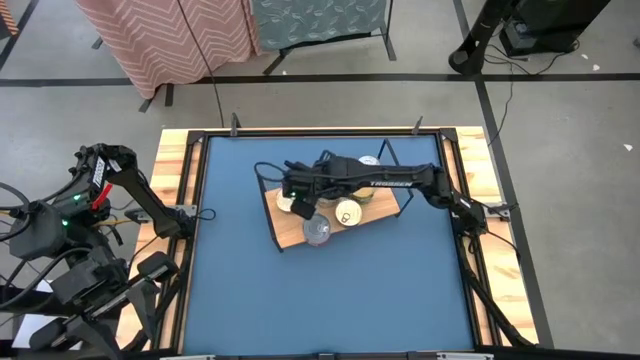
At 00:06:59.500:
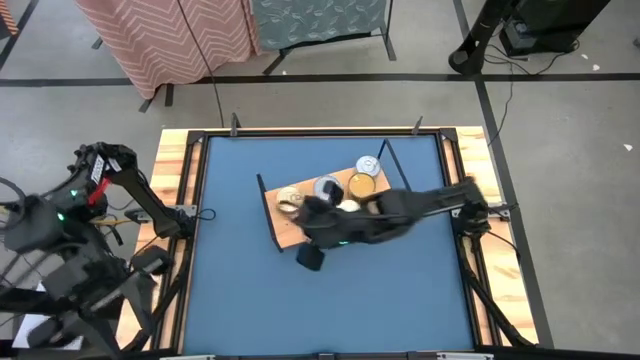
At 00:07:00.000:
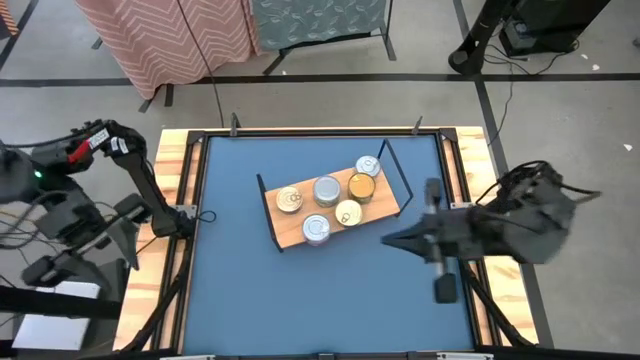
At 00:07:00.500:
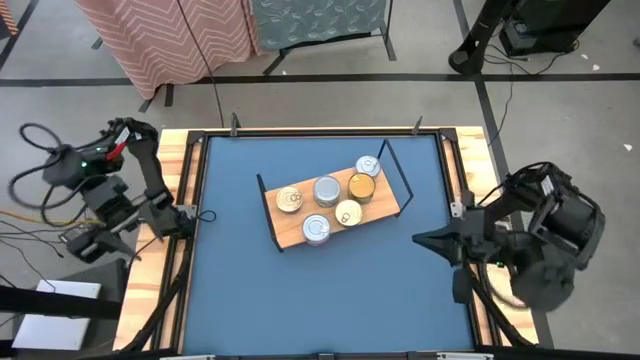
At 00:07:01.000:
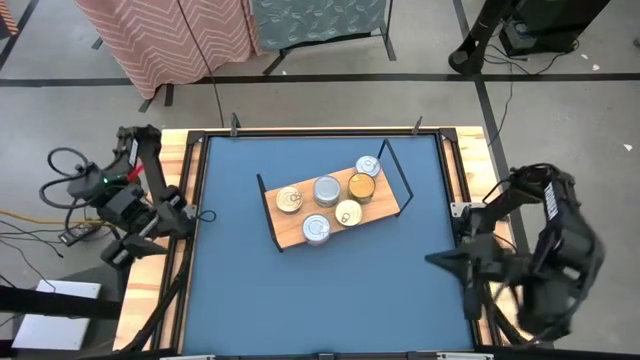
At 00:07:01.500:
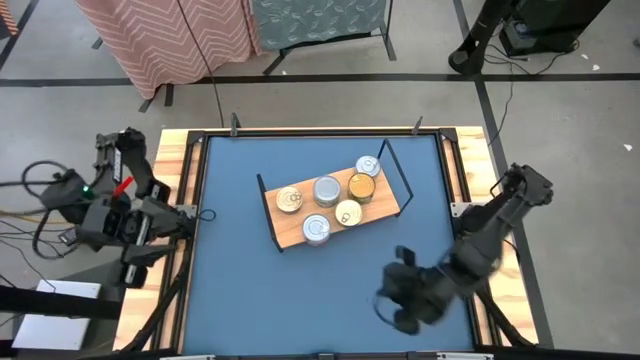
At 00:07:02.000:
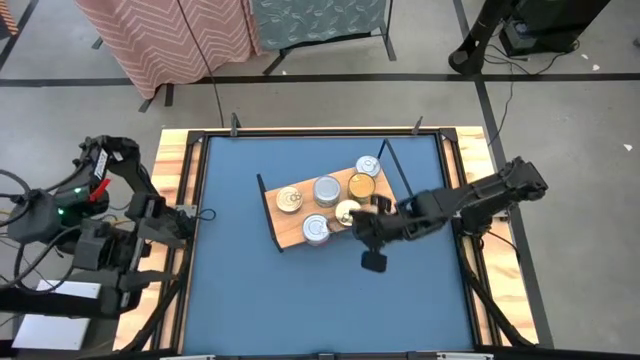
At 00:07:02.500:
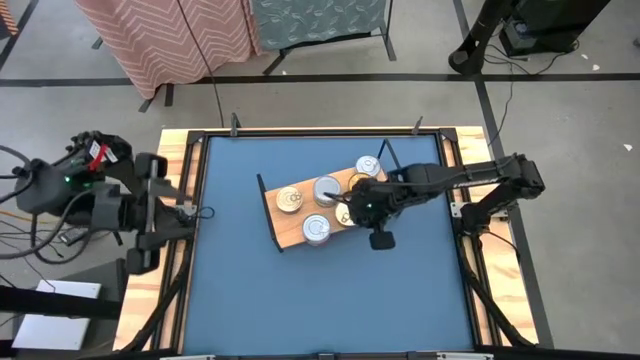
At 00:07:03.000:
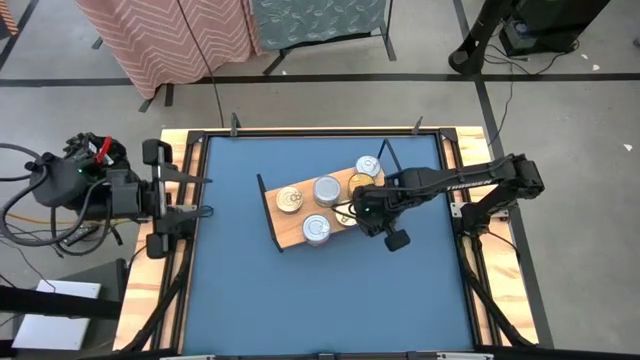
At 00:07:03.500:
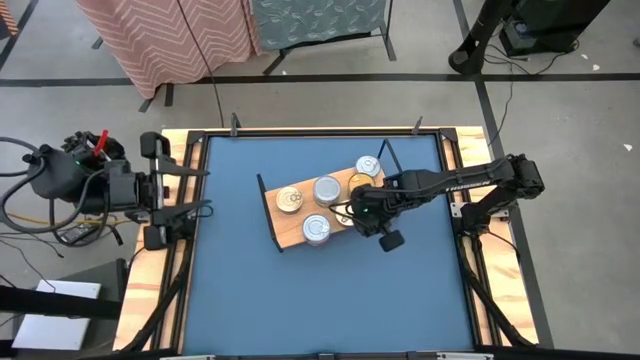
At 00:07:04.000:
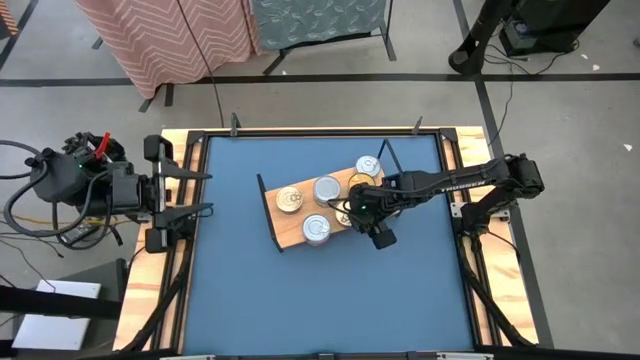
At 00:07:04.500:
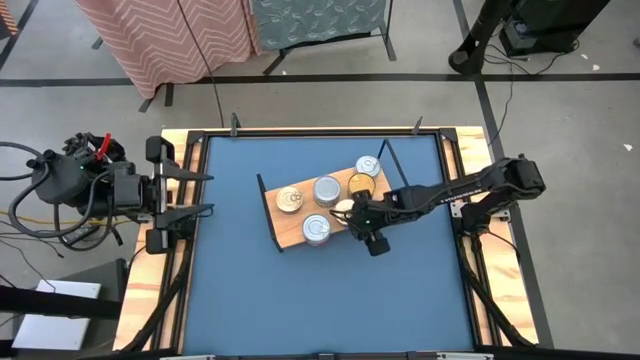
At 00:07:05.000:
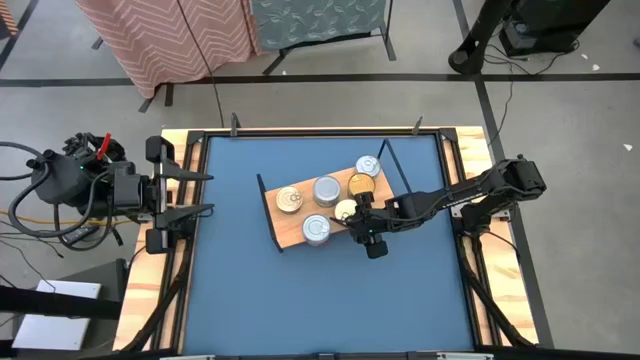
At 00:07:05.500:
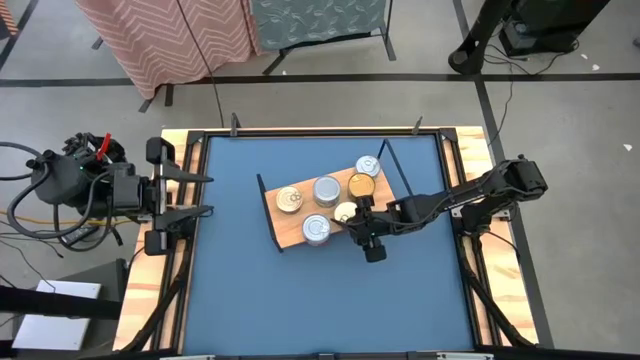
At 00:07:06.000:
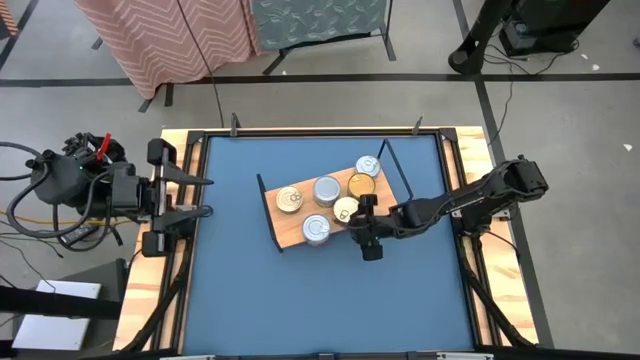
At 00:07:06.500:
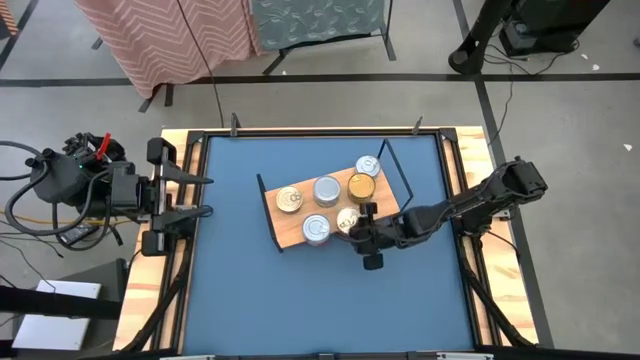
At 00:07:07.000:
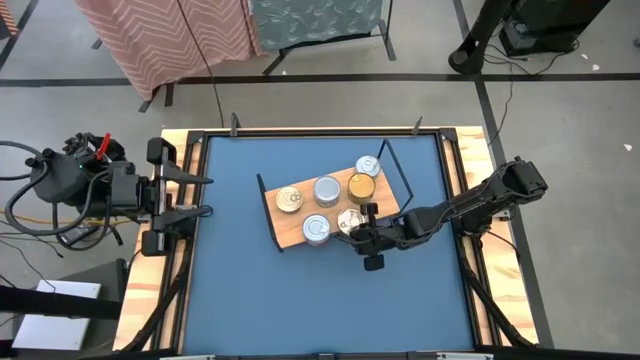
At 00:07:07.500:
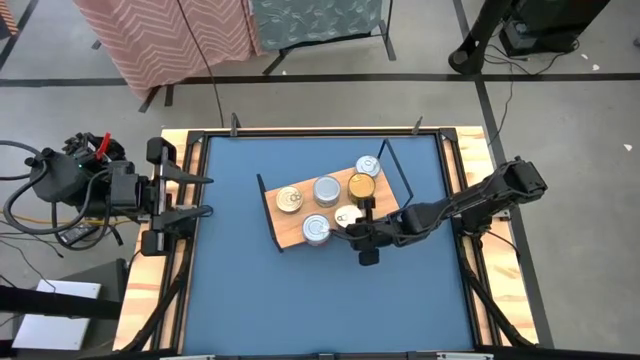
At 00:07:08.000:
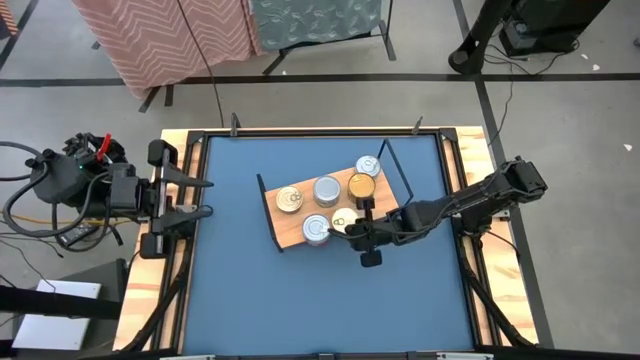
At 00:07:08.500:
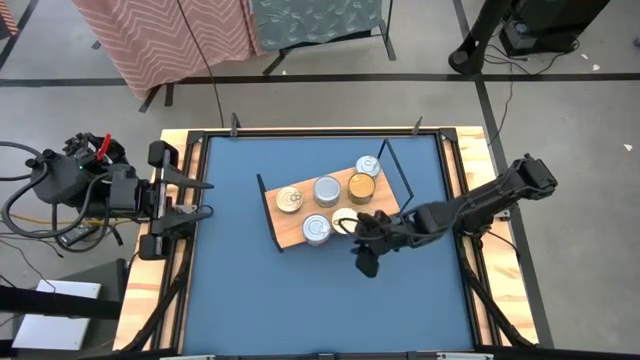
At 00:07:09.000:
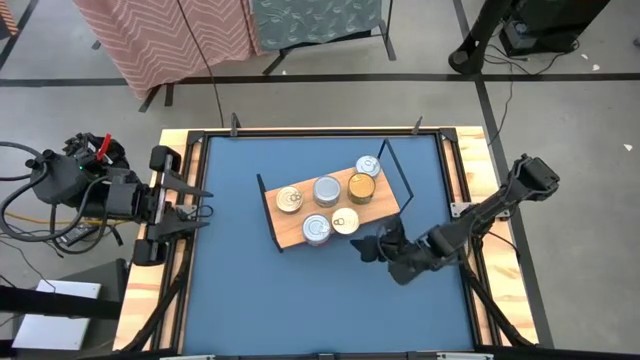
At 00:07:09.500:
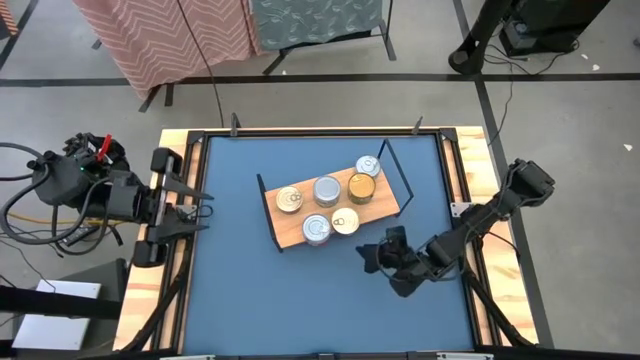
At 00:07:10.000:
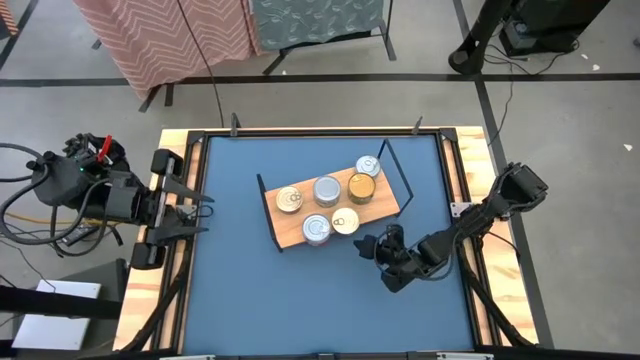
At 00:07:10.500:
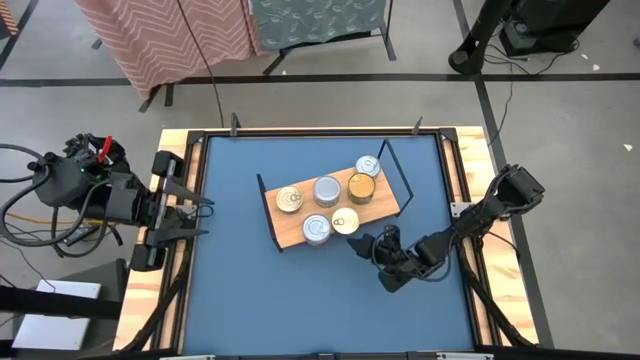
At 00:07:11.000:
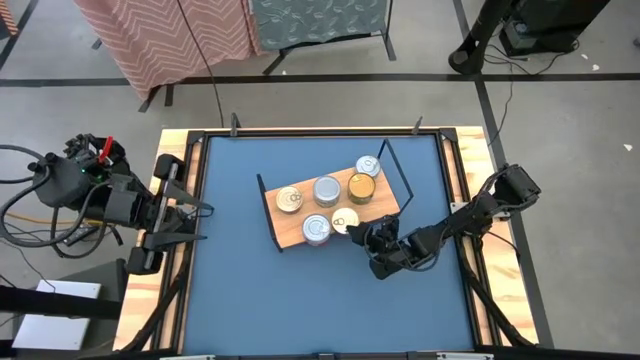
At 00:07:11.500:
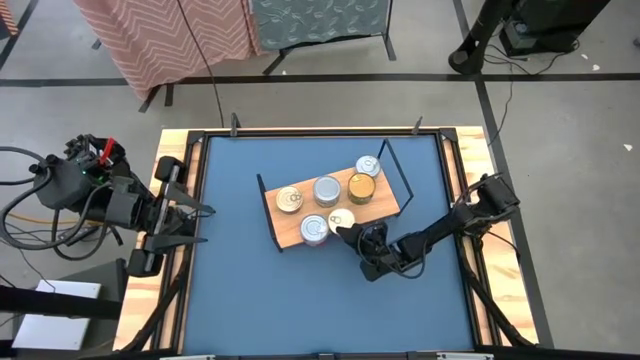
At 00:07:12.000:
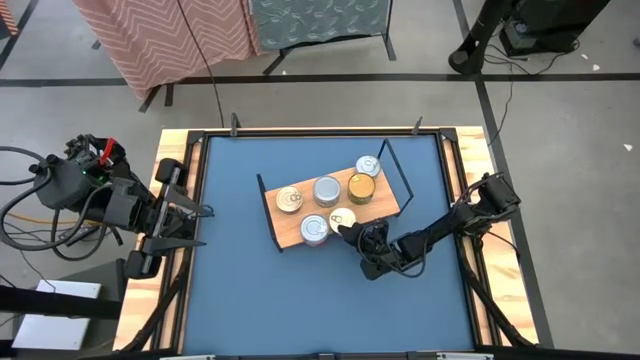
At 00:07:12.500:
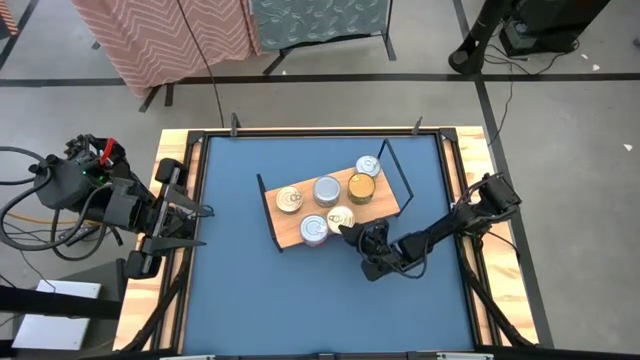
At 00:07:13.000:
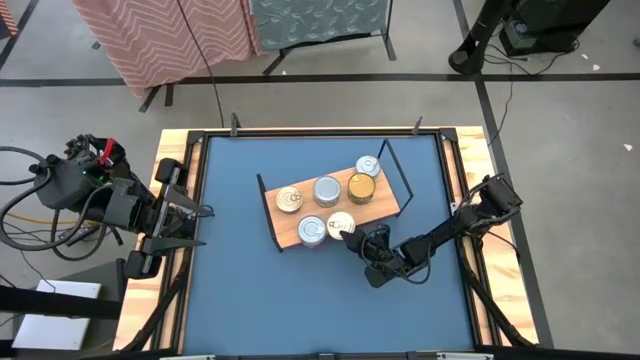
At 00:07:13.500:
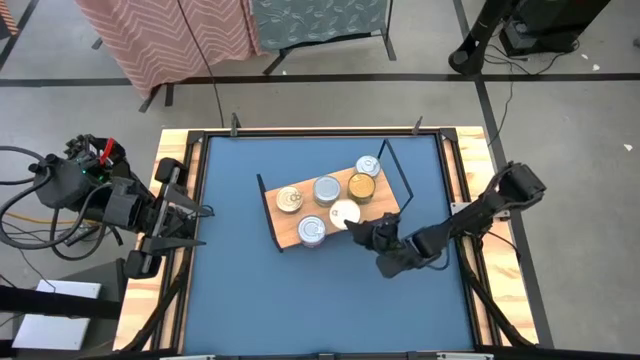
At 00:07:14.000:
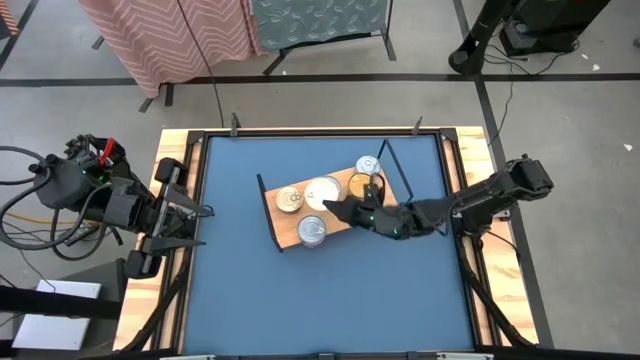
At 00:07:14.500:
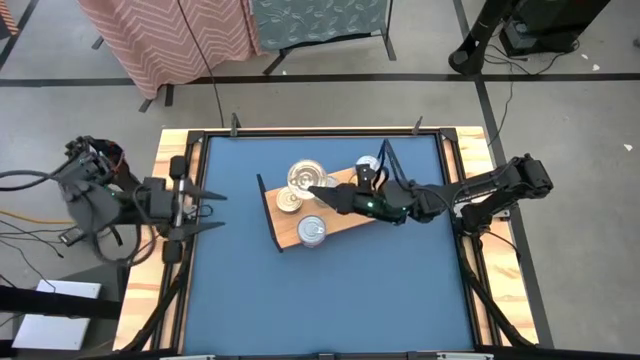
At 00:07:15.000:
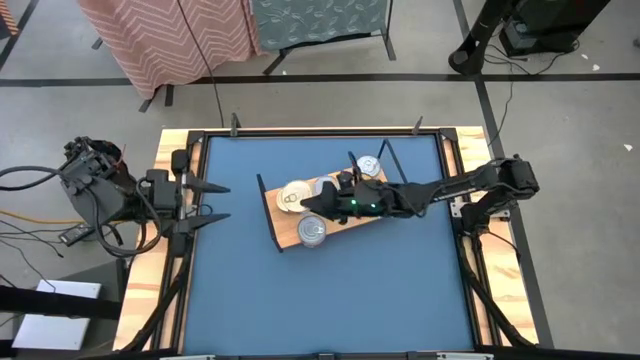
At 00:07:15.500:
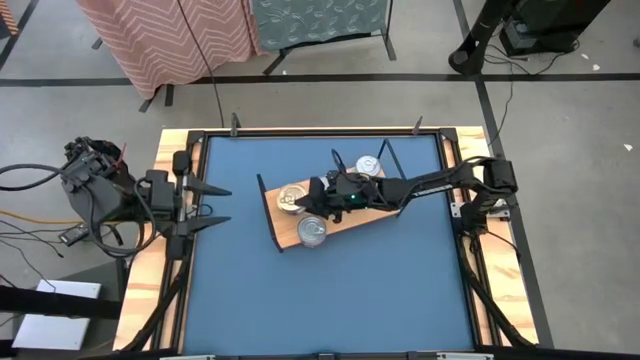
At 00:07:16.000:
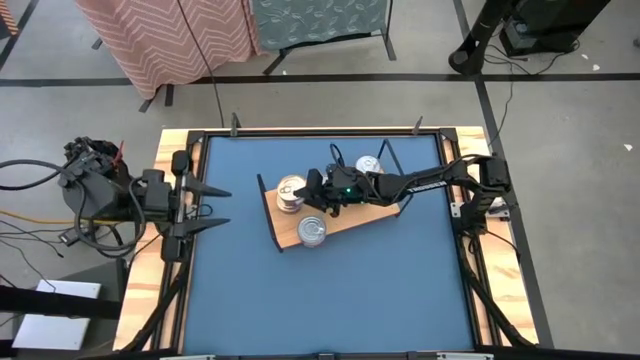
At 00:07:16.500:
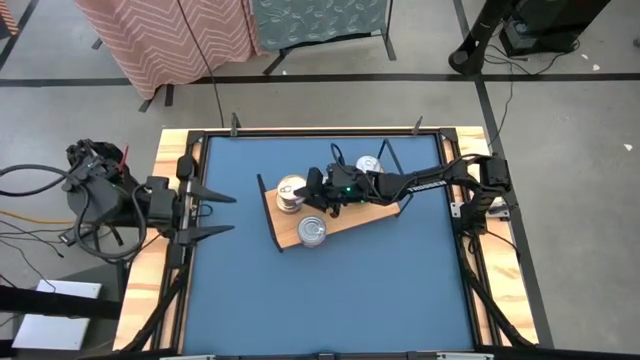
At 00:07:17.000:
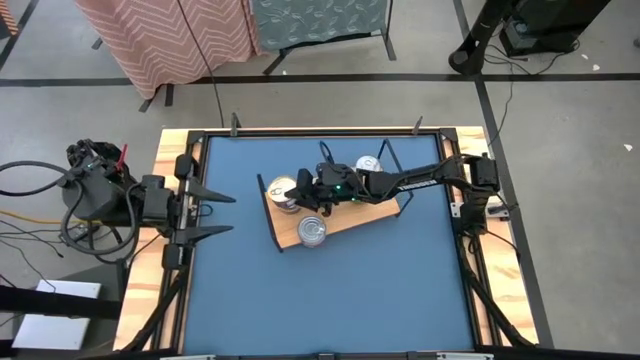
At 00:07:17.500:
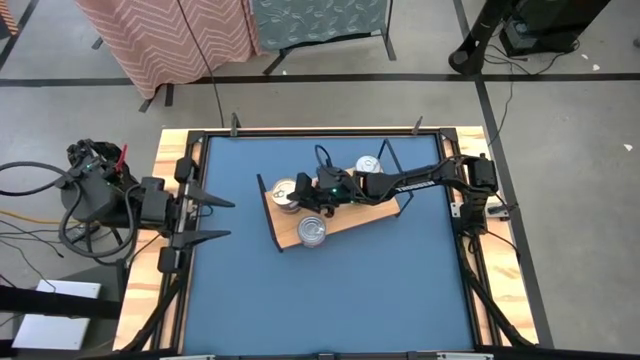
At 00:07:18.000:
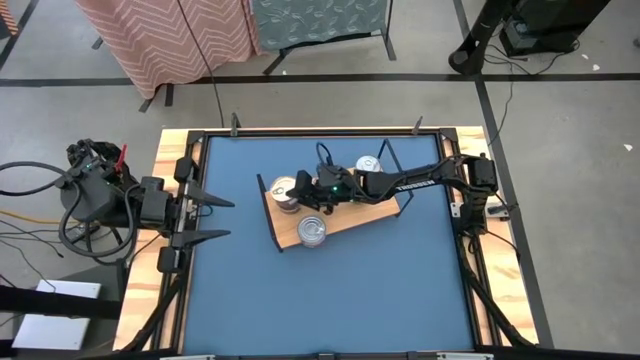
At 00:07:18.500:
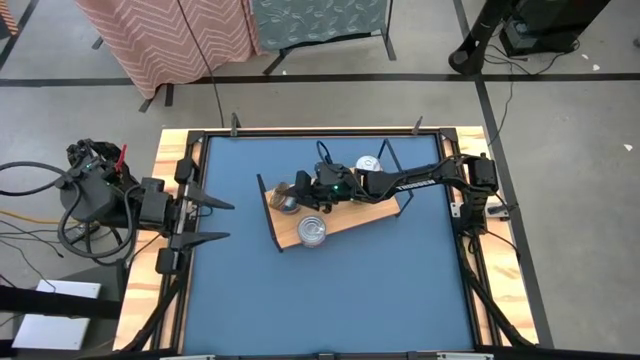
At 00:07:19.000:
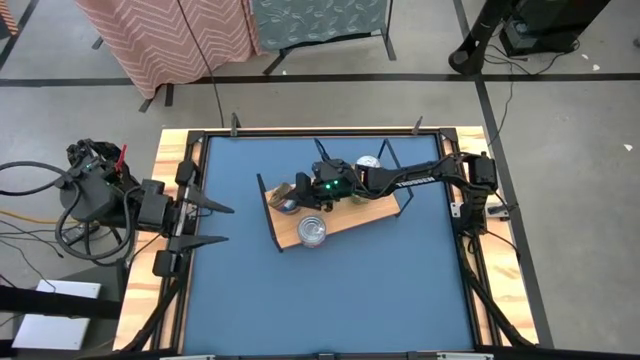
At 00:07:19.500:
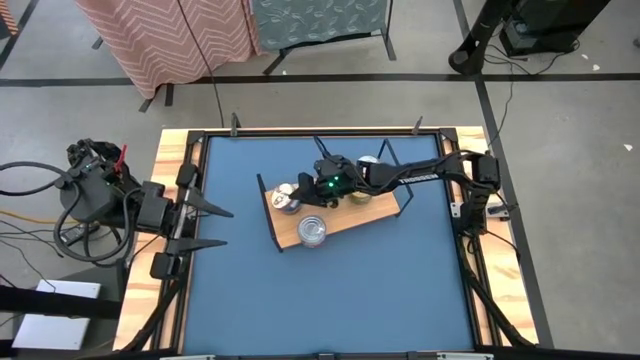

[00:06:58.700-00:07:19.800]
Task: Stack canned seafood by type on shelf
Stack the blue/pink tuna can on top of the blue/pink tuna can on the shelf
